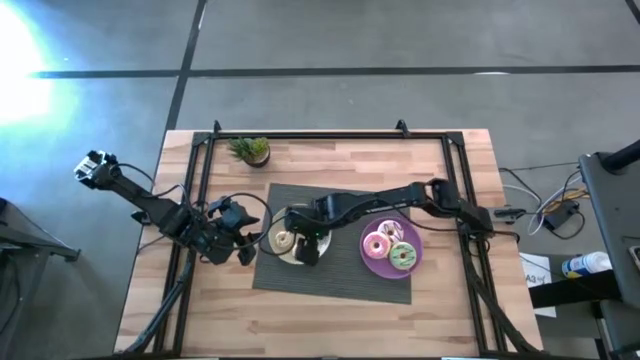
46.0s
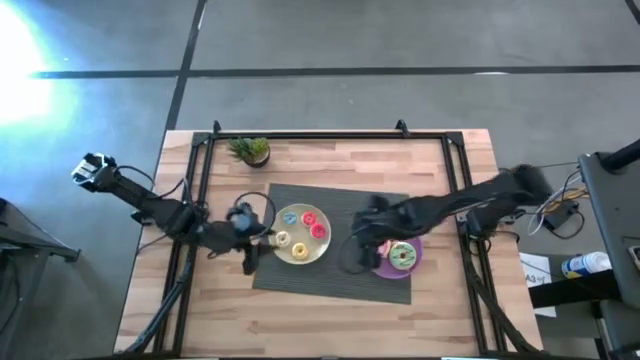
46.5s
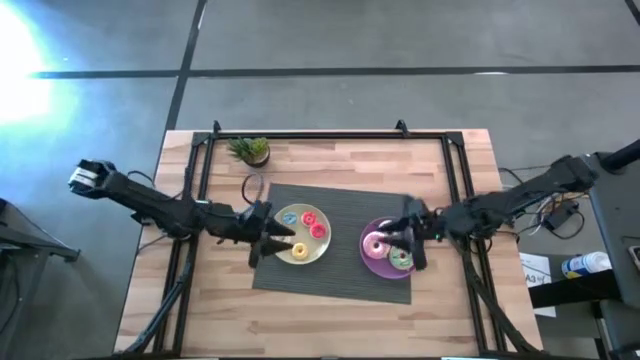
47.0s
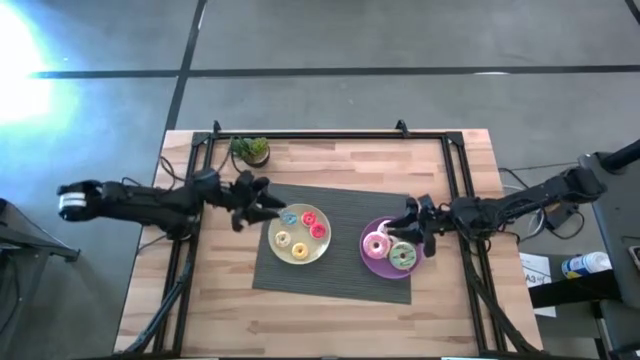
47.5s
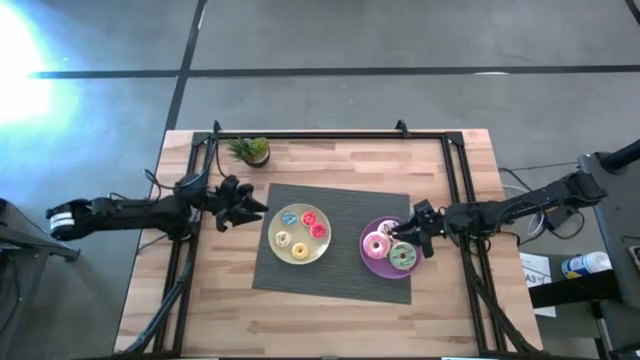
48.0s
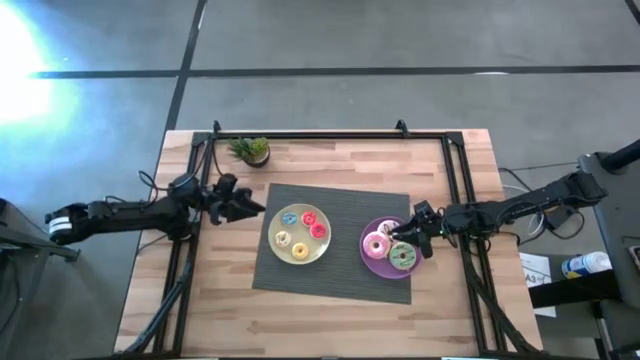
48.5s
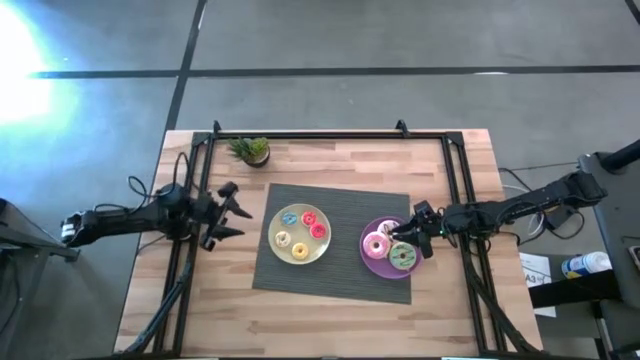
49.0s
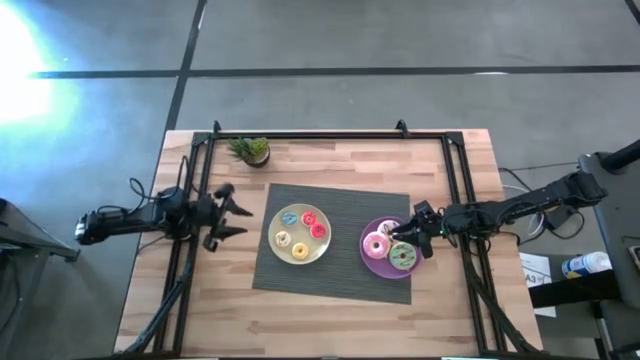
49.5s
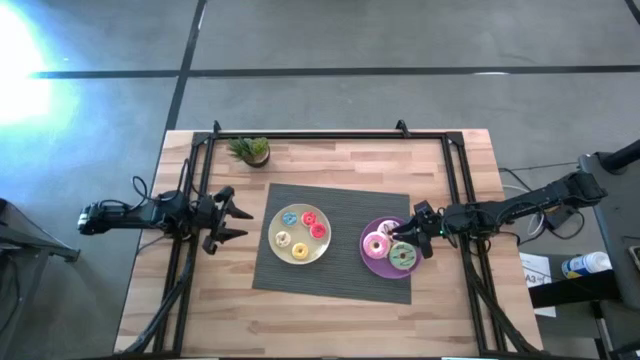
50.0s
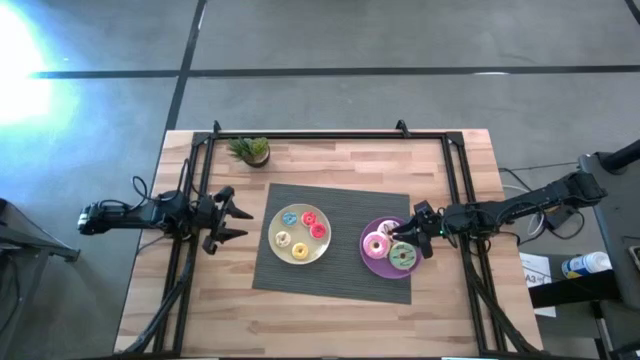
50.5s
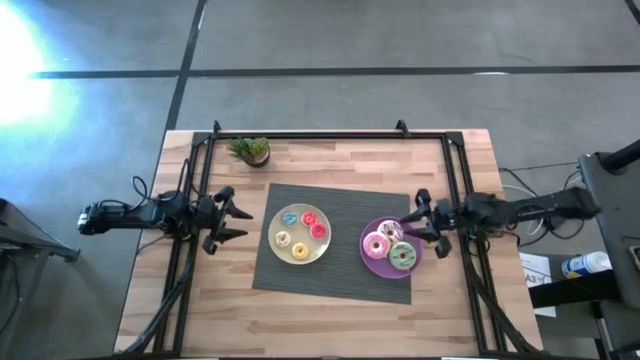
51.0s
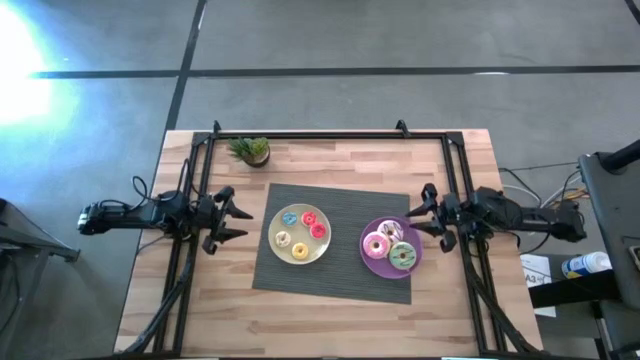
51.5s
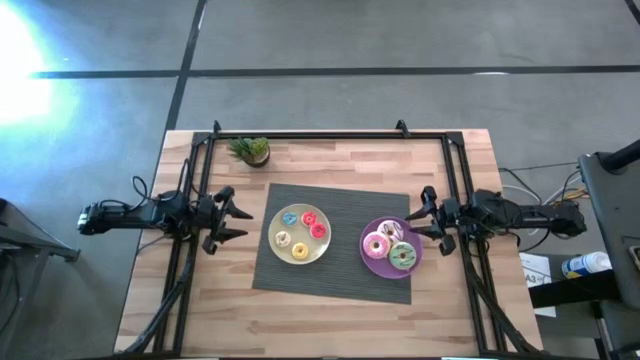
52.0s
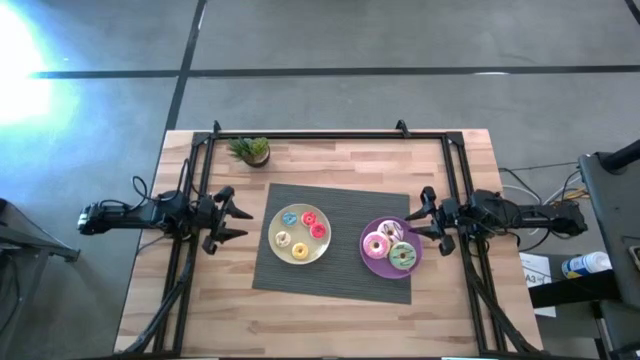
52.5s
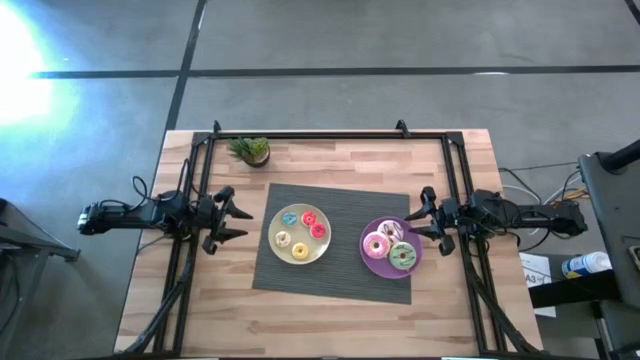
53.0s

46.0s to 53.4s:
Task: Pick & Place donuts
Return to Home Position

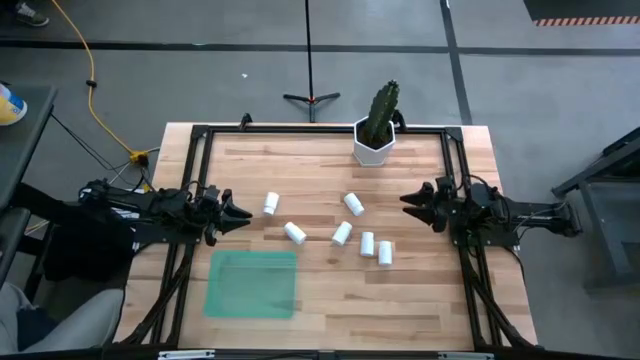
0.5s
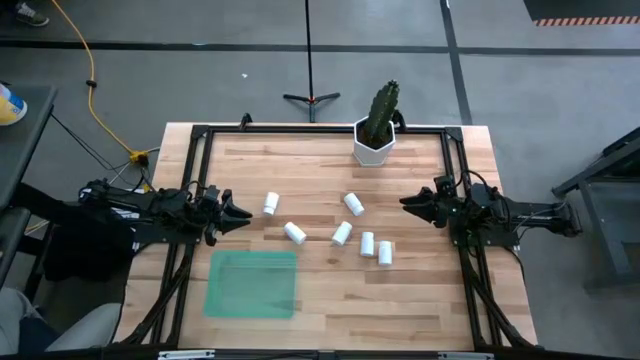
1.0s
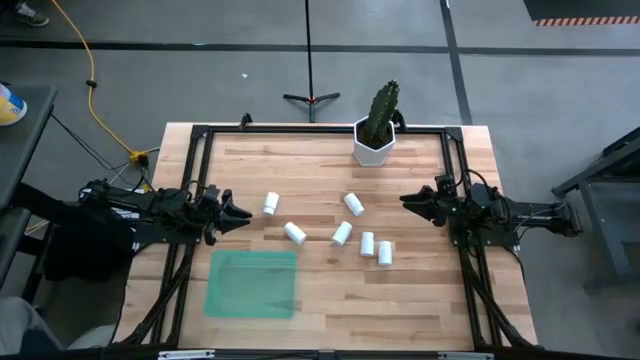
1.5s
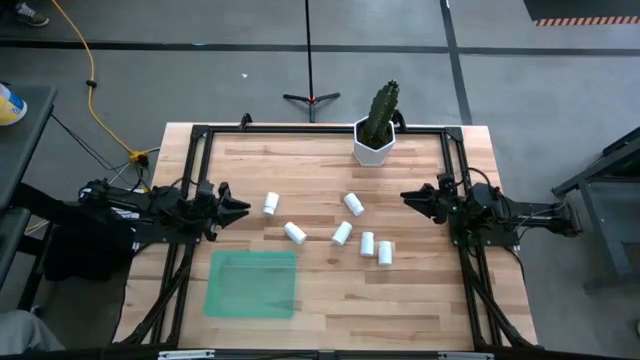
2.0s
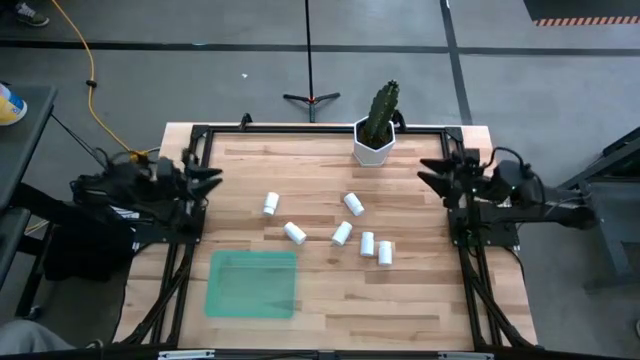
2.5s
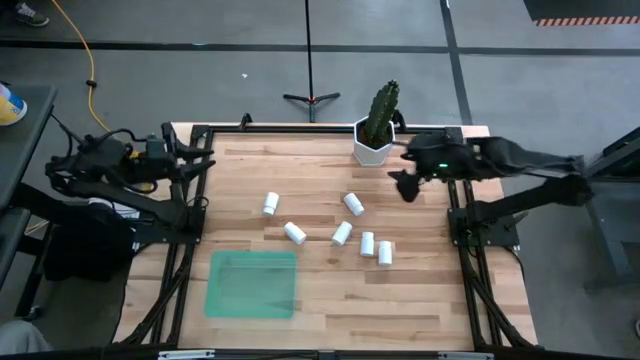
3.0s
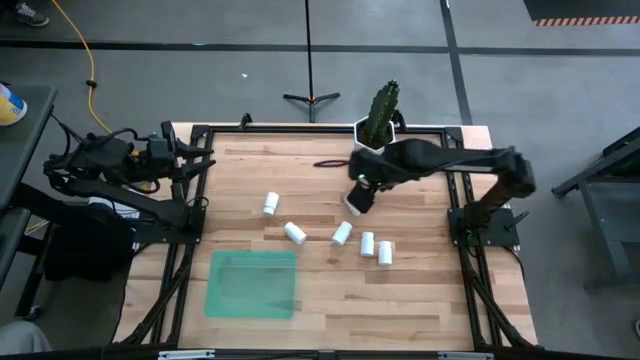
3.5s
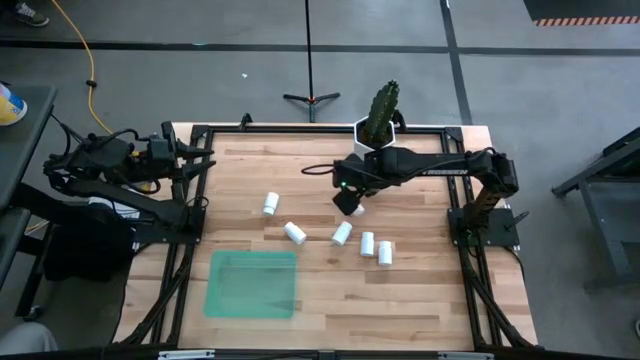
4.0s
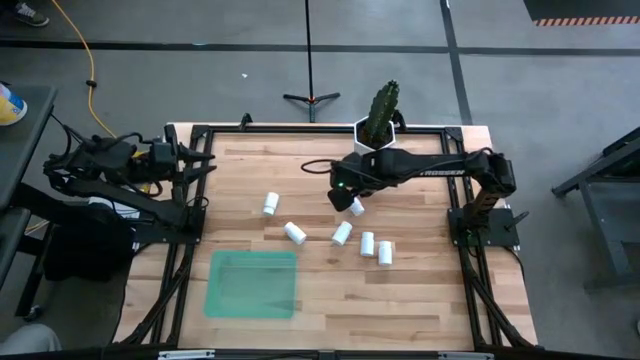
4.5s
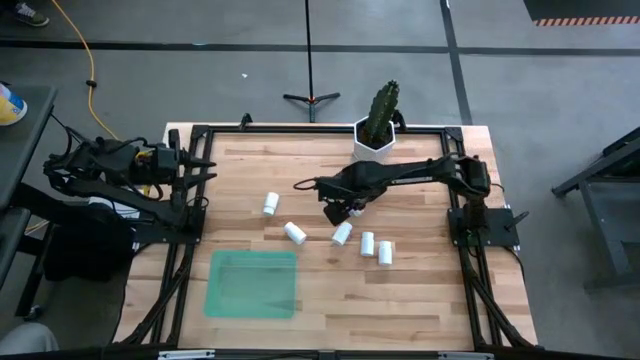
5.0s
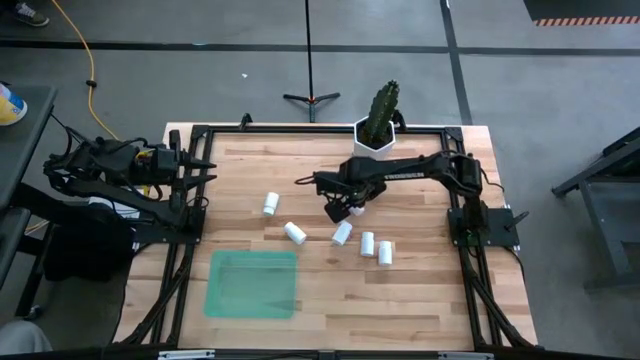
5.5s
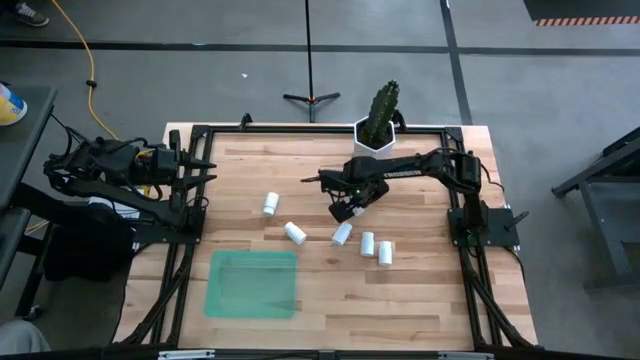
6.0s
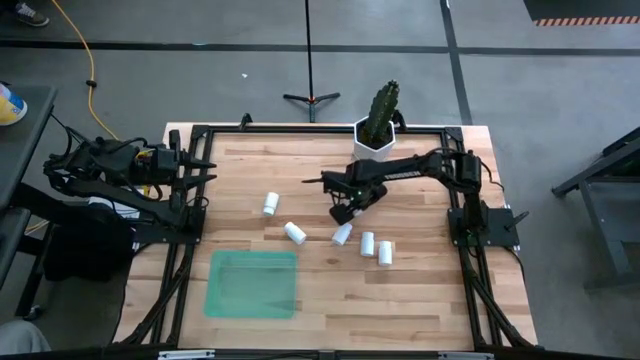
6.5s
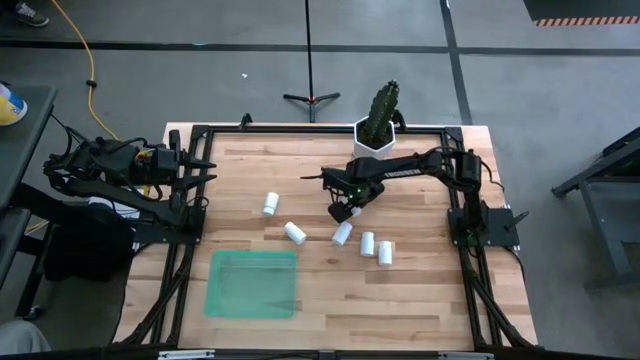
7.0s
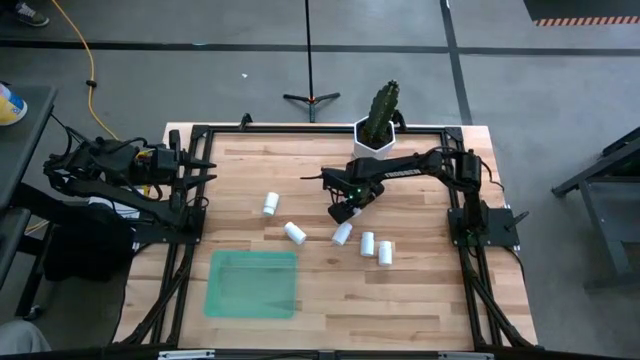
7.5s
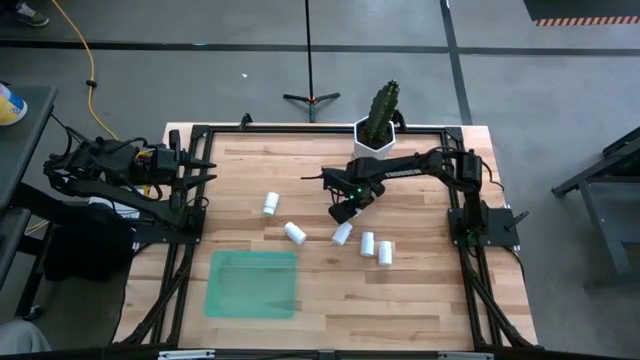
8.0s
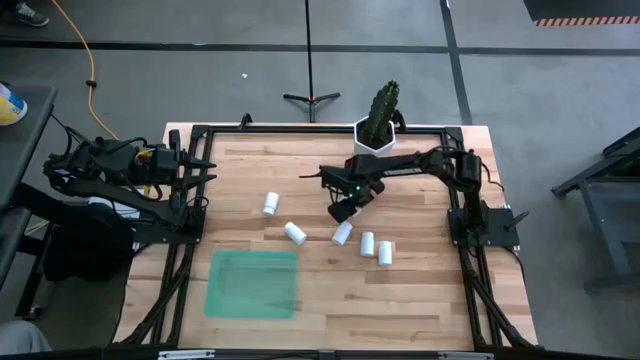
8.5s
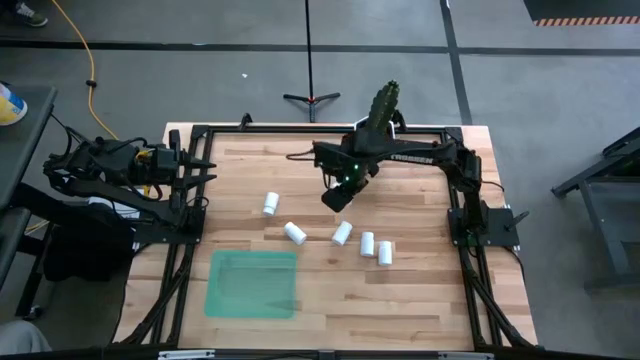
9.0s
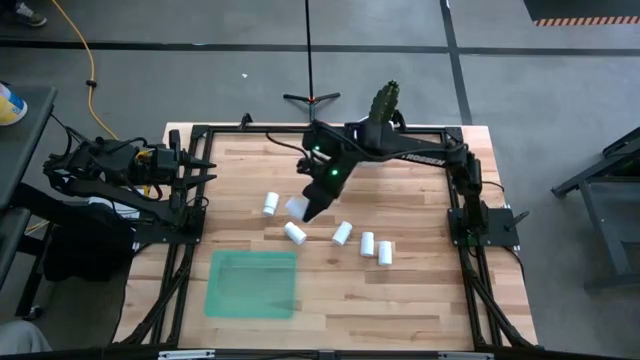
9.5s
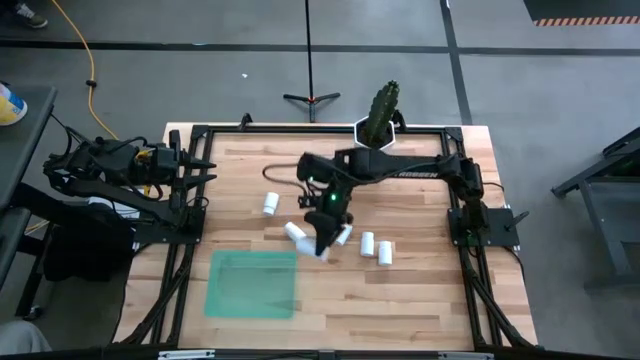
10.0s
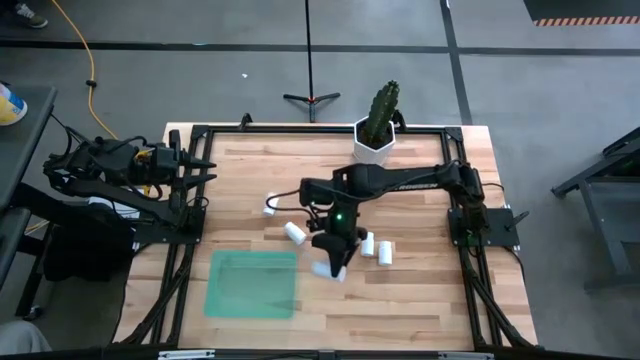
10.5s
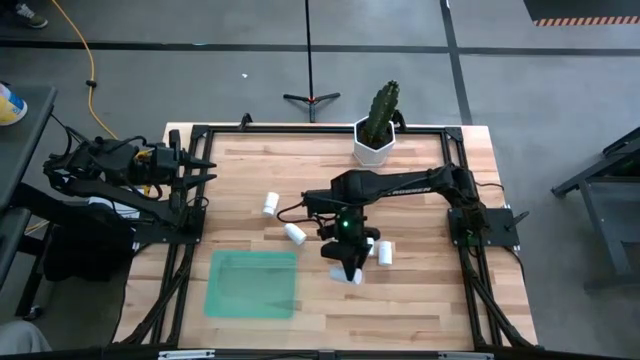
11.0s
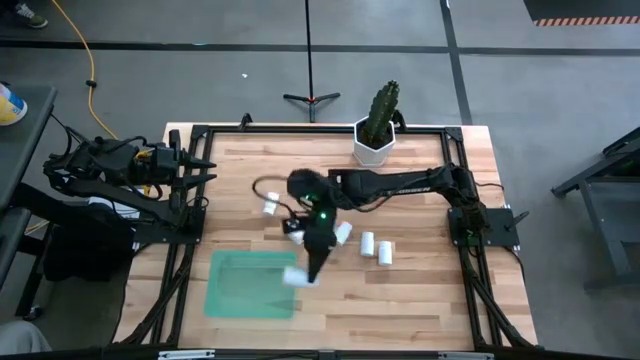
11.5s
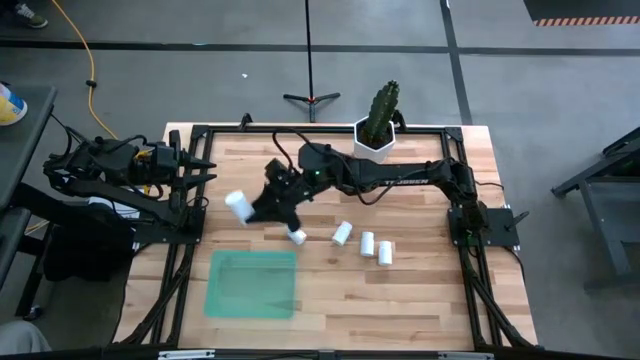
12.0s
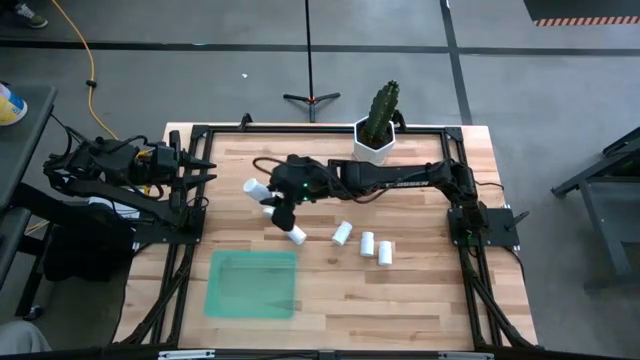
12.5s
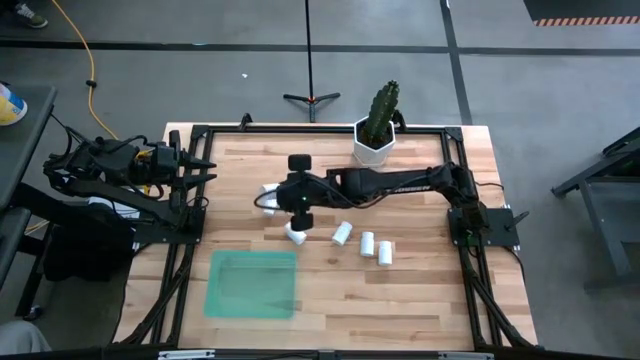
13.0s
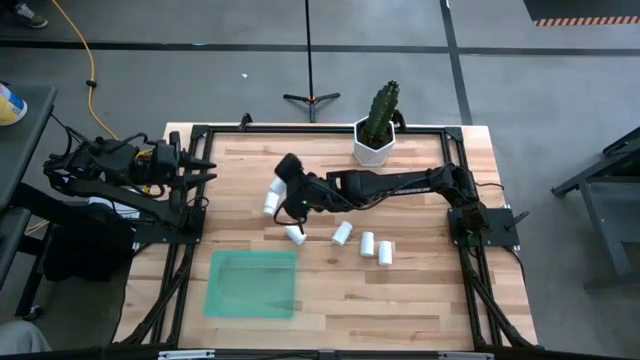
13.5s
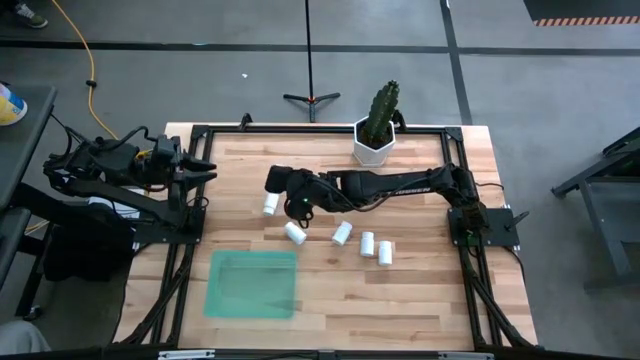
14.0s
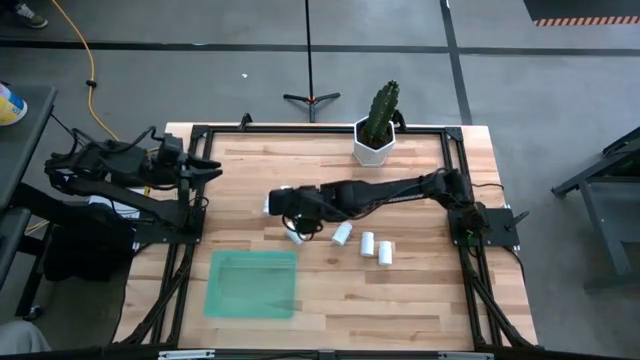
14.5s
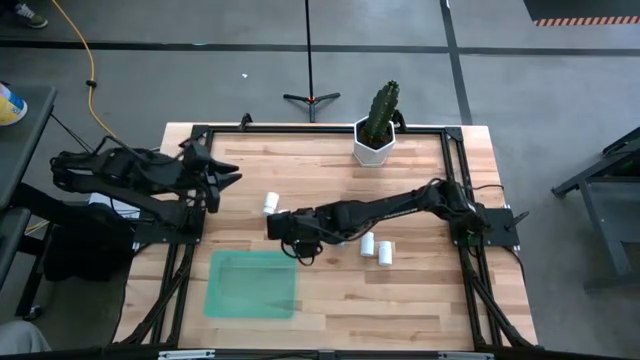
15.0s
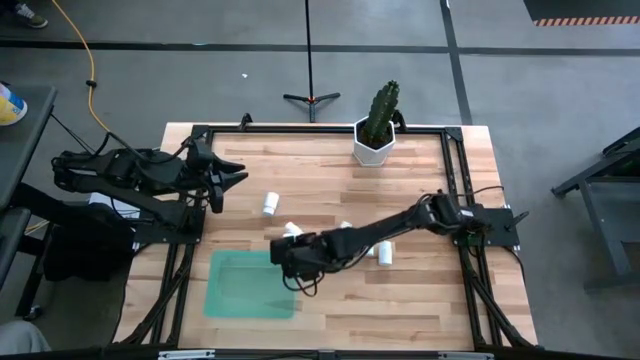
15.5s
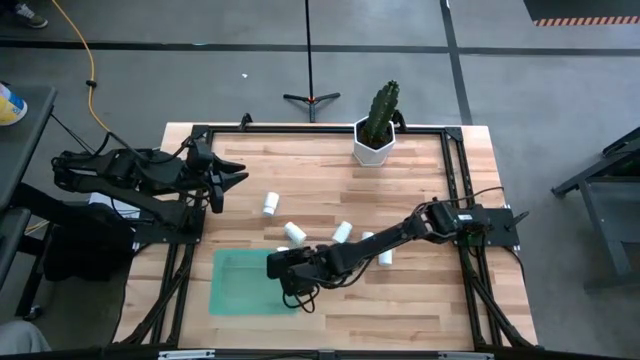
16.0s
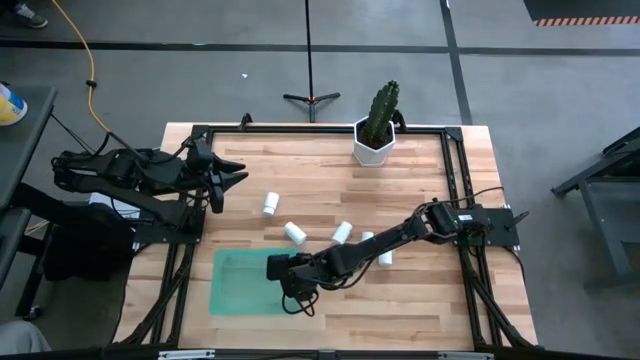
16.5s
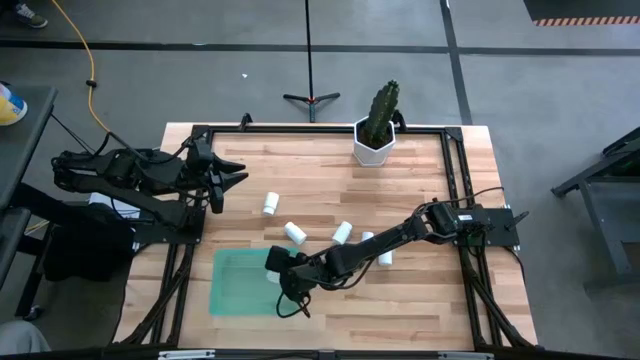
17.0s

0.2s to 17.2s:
Task: Pick and place pill bottles into a basket
Put the white pill bottle into the green bin
